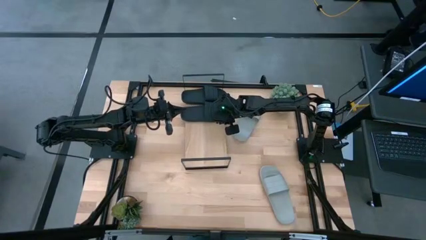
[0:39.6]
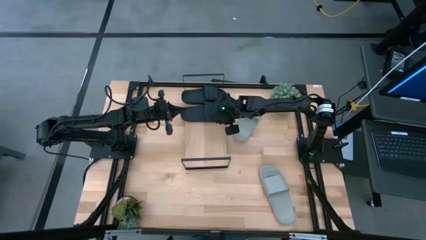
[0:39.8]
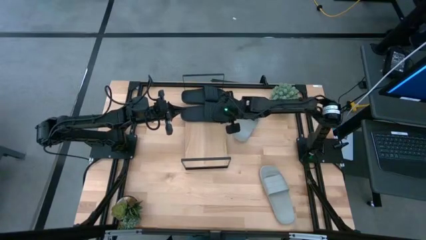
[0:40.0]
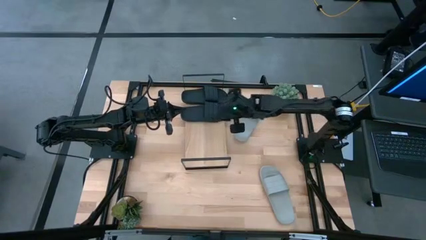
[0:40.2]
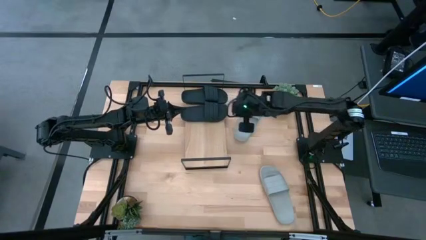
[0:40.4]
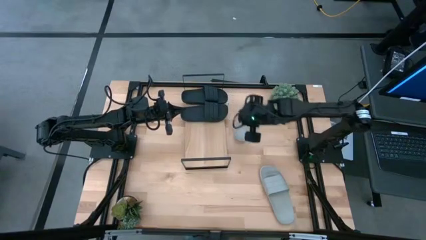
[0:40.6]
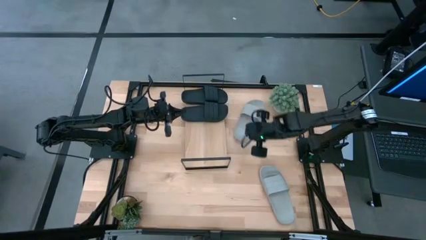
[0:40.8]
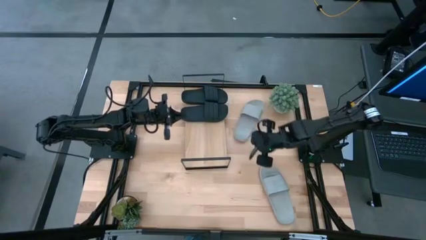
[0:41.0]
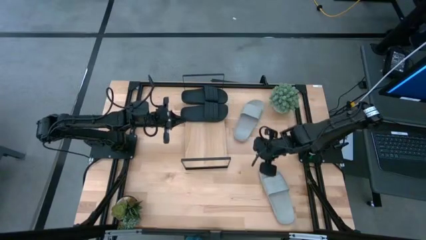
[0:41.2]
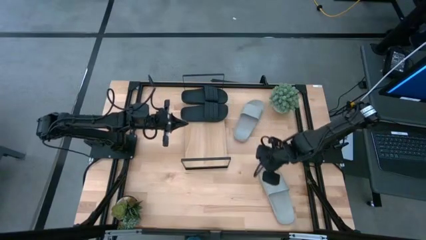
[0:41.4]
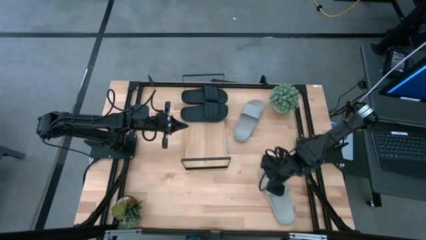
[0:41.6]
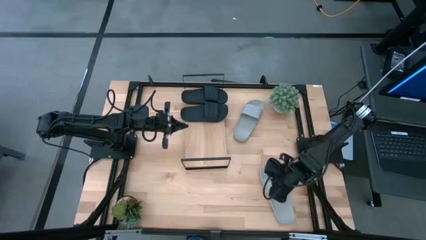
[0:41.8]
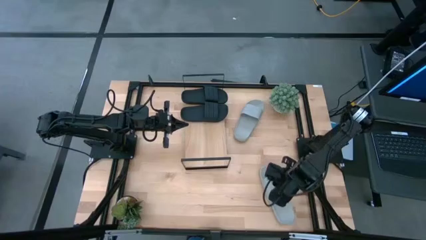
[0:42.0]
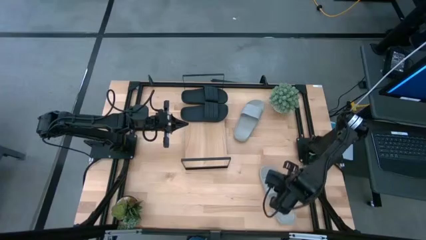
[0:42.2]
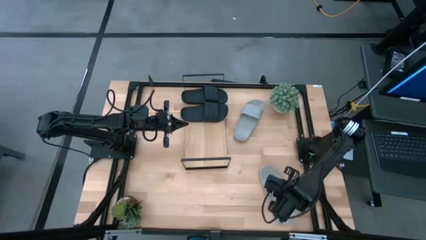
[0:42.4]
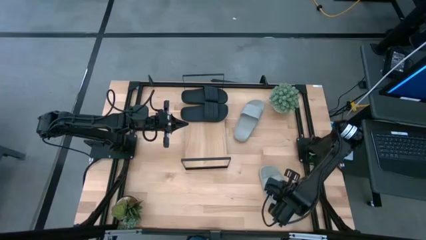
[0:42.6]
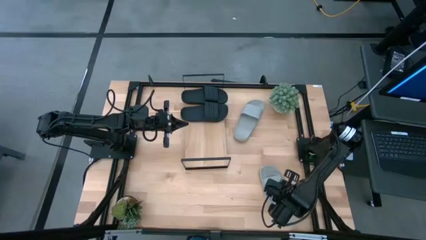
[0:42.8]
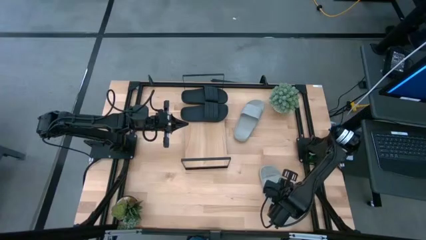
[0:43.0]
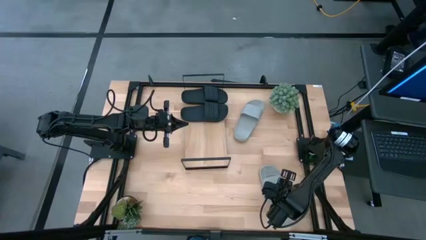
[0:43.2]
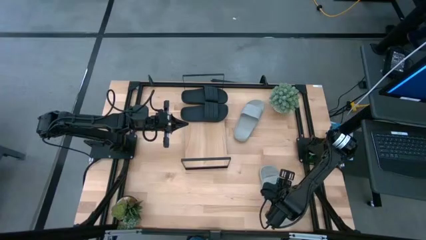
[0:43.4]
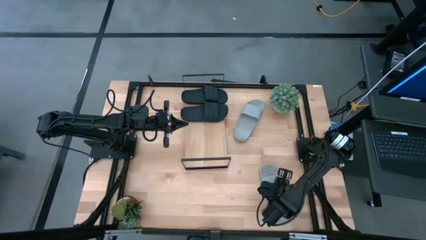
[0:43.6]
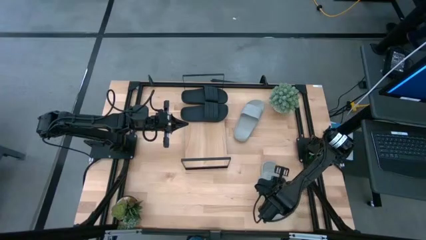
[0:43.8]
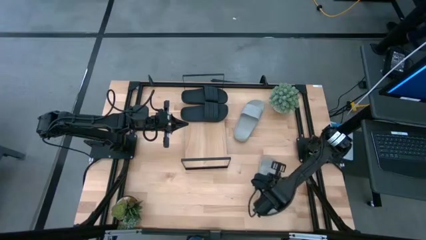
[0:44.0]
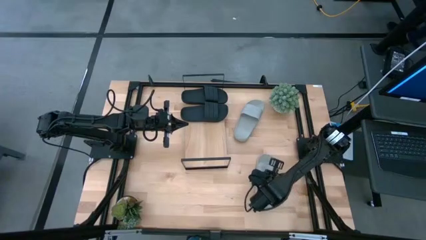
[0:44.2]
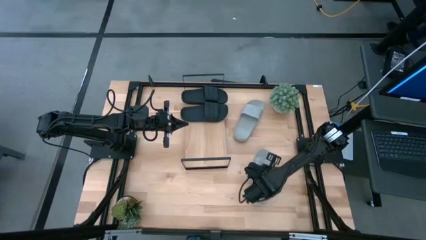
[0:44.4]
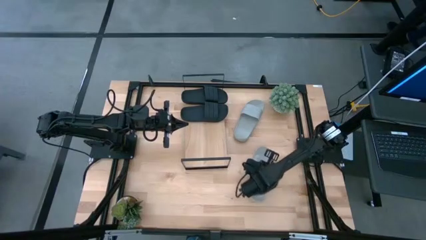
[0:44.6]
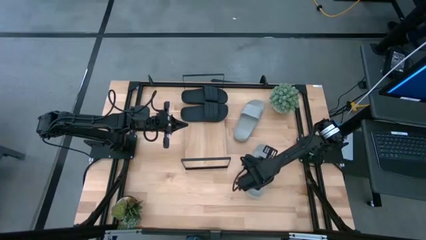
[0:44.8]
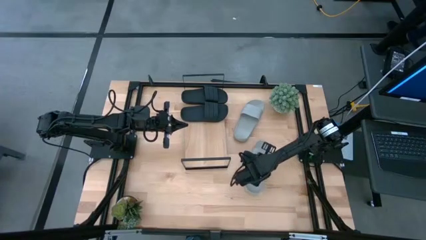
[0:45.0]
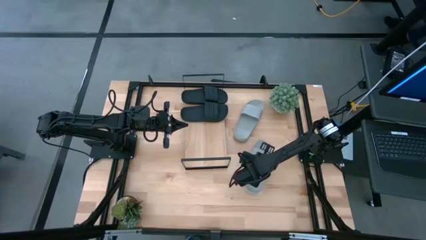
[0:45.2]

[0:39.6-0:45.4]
Task: Pick and place slides into the shelf
Move the bottom gray slides to the bottom right of the shelf

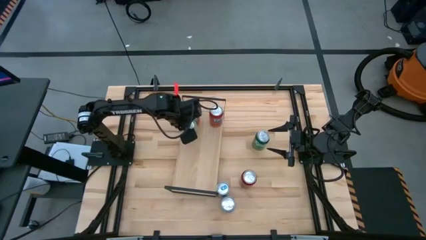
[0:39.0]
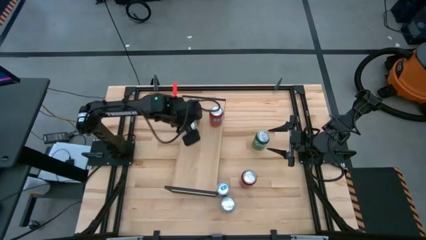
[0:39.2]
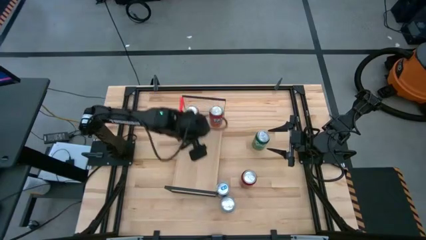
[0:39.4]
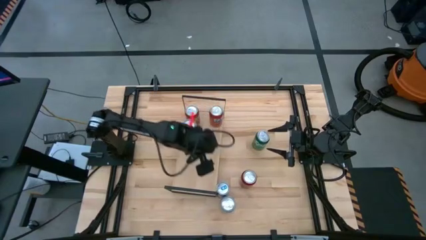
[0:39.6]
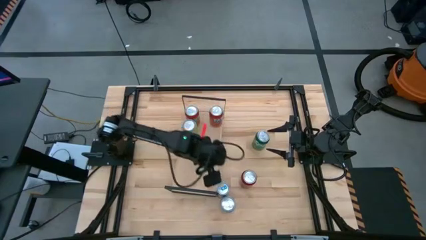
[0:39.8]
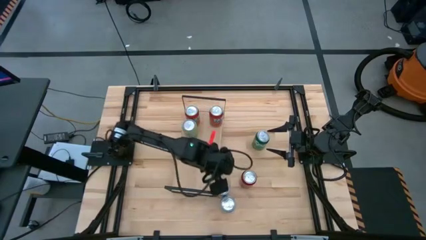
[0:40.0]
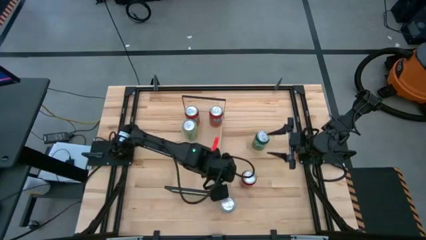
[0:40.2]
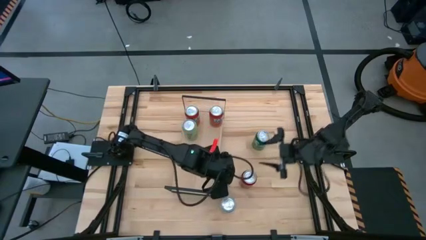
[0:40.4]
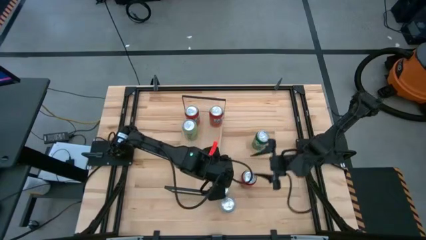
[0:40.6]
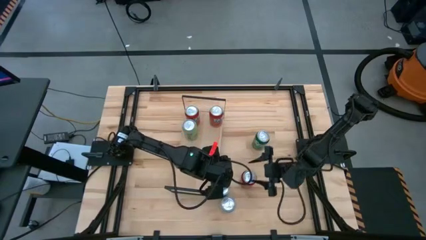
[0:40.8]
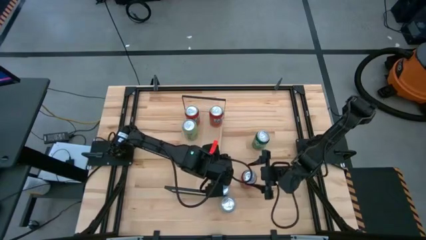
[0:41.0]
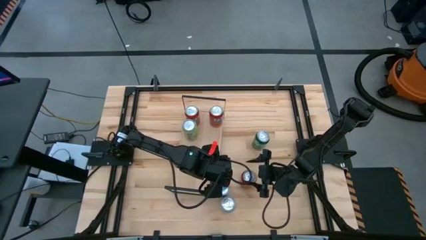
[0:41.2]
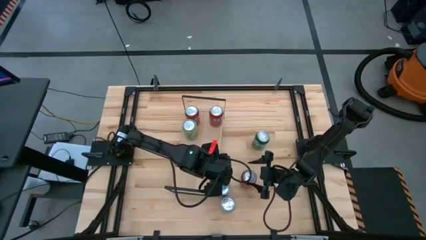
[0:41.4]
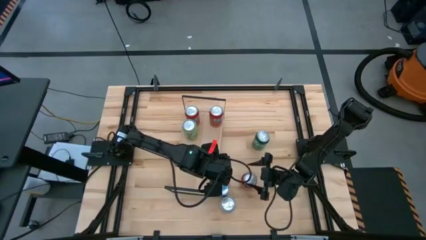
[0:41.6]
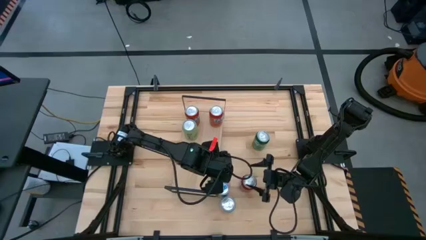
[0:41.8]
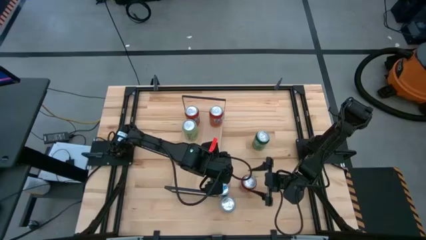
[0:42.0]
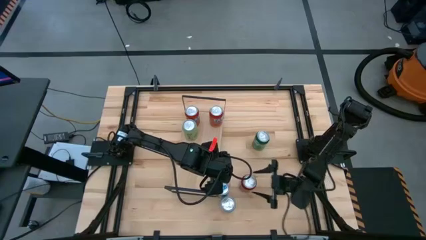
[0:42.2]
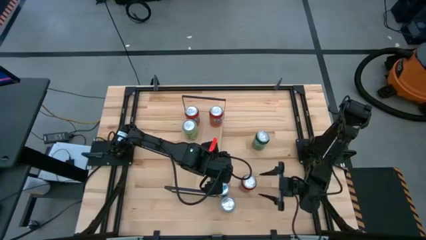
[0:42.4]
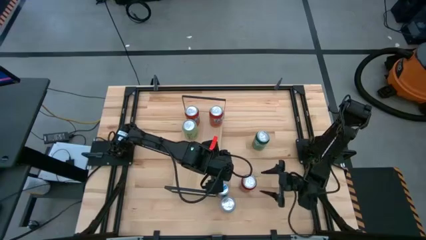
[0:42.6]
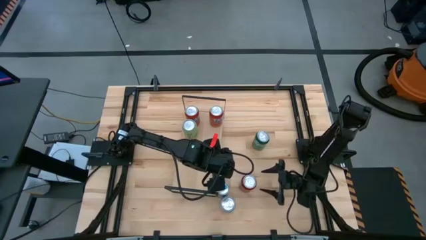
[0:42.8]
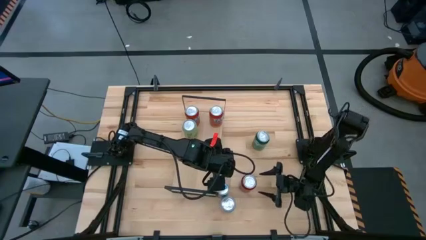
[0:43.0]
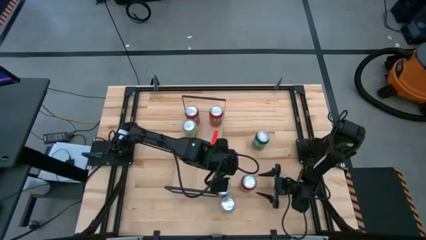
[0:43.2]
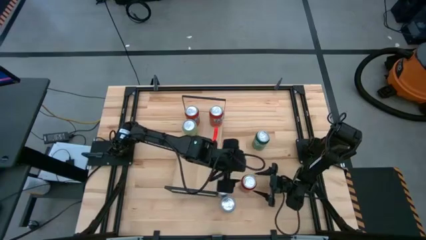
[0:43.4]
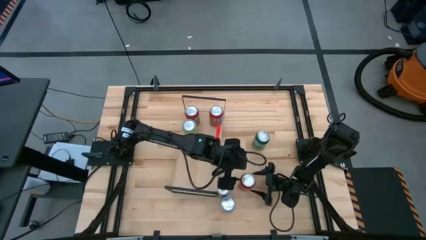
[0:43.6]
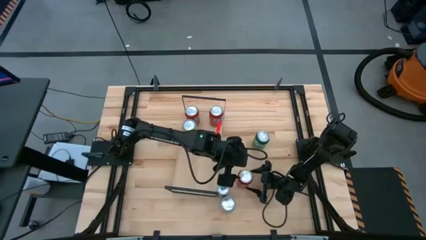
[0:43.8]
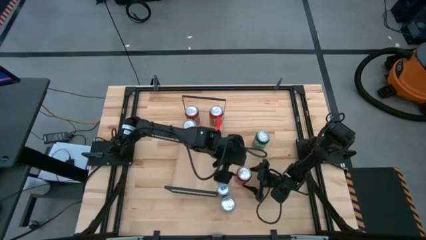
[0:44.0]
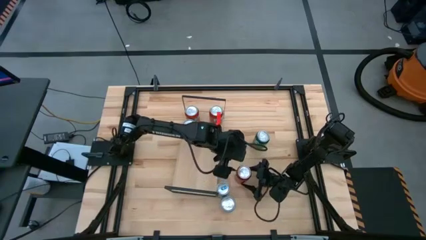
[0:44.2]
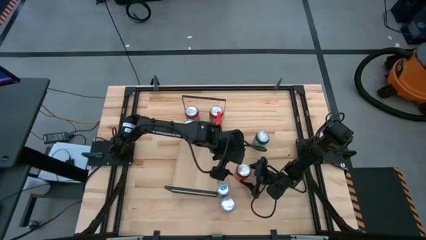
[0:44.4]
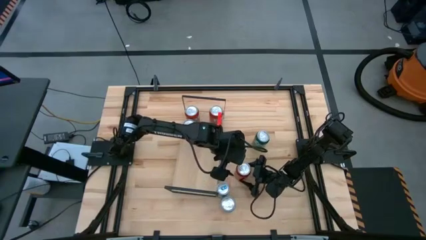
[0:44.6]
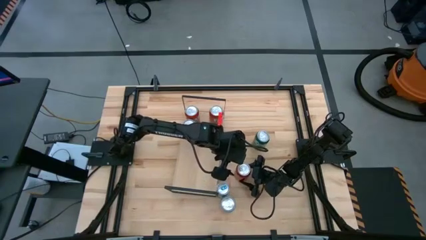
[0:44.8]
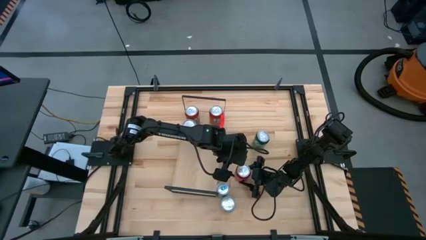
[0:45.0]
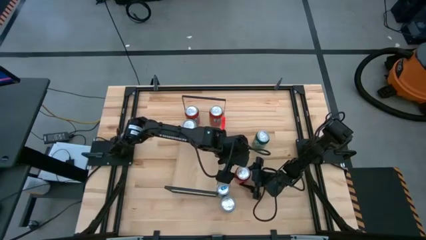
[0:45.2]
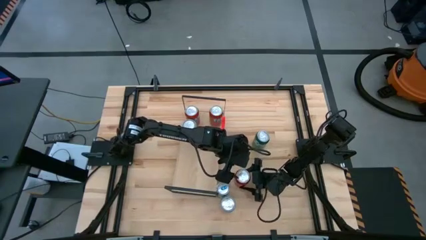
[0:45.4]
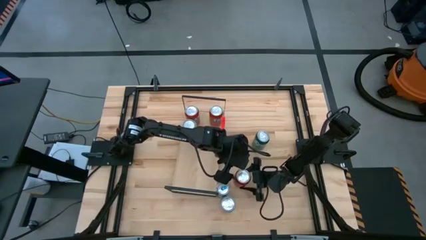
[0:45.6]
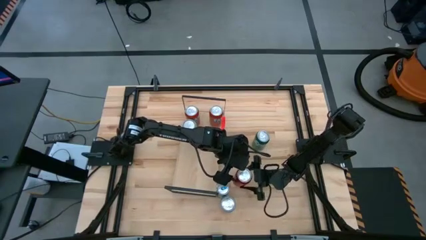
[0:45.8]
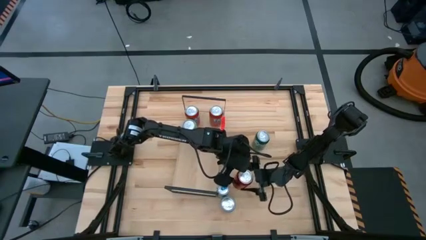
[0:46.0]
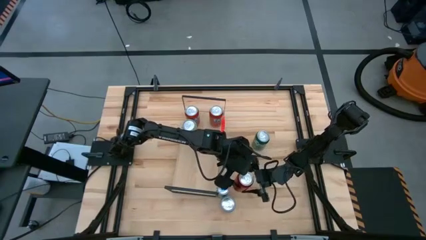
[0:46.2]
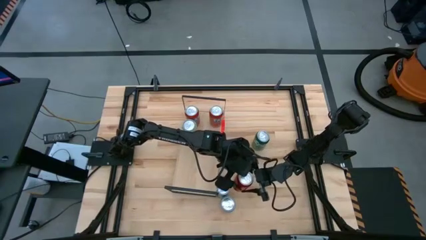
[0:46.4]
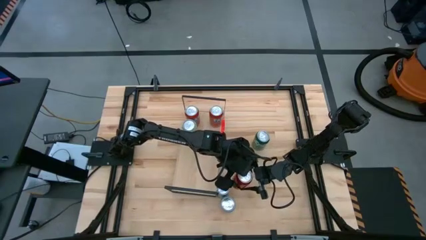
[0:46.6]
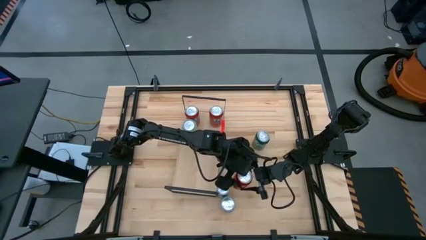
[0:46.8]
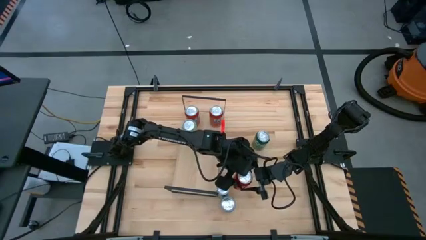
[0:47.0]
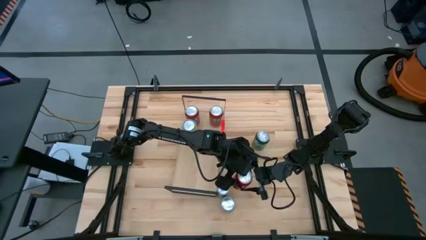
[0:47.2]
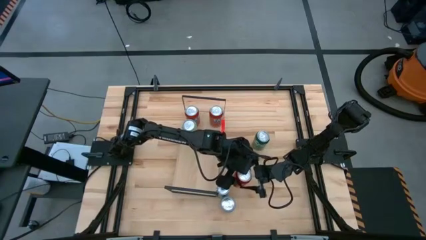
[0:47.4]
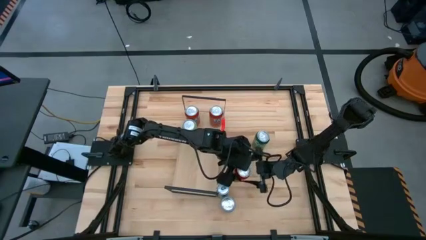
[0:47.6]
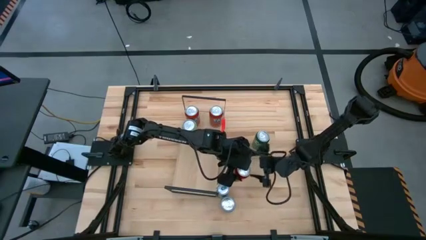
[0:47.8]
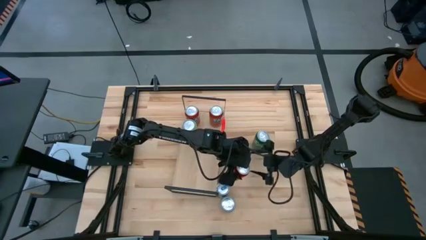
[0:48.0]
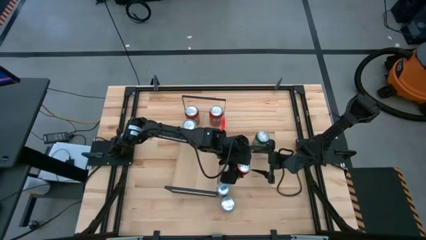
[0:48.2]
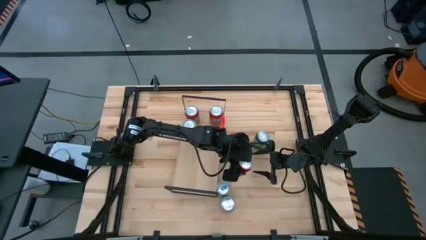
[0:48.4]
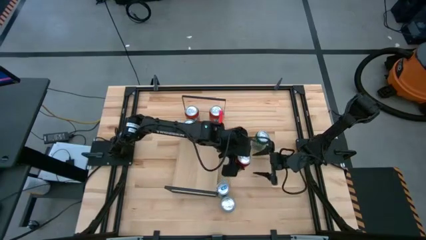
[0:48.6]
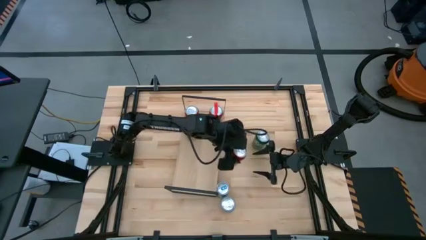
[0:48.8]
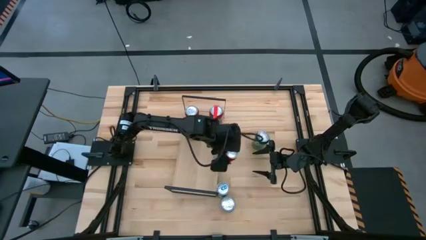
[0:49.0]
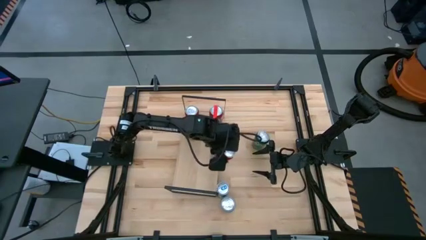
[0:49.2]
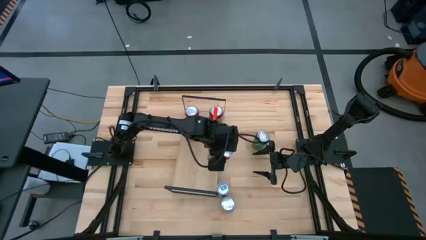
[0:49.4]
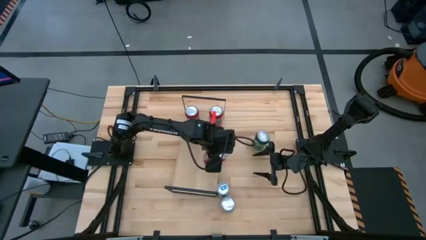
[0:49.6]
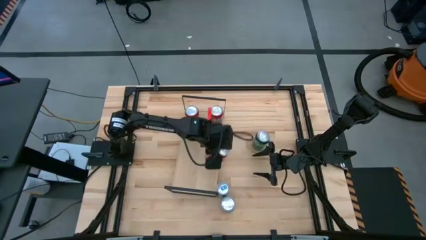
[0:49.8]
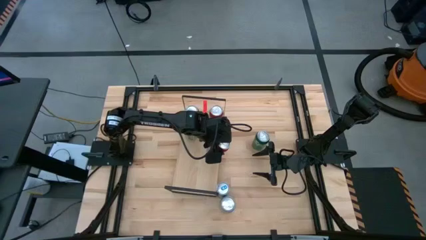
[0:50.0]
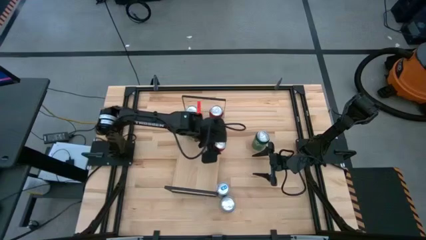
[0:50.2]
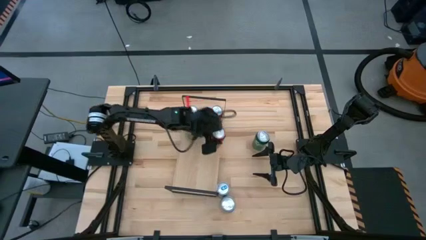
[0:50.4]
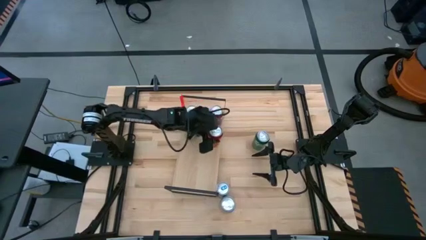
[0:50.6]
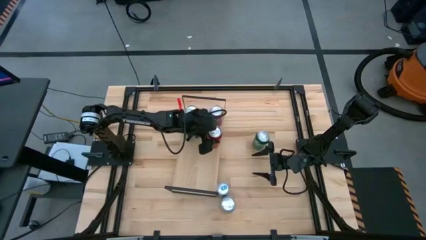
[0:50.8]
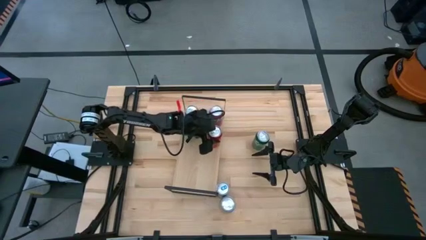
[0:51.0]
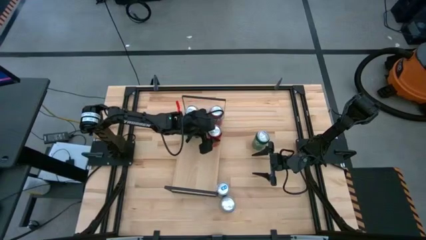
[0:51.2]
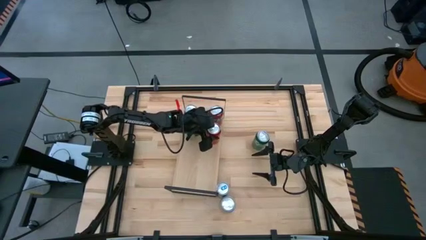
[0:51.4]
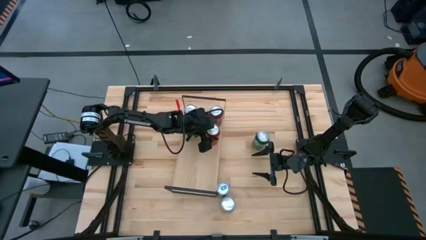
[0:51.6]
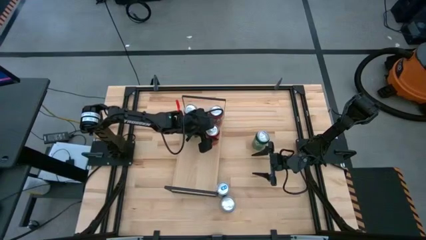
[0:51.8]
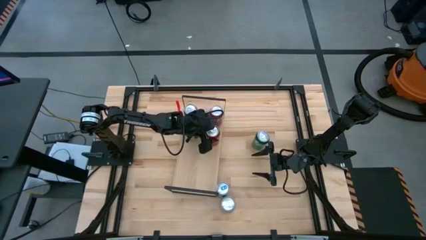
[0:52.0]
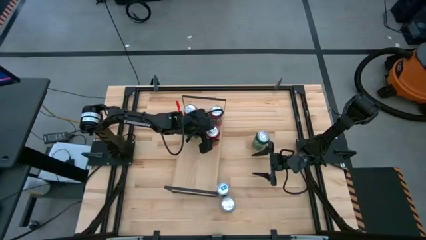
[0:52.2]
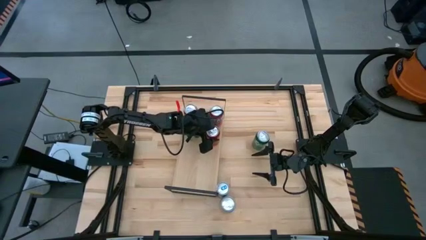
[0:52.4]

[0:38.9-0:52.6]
Task: Place canned beverage on shelf
Put the red black soda can on the shelf
